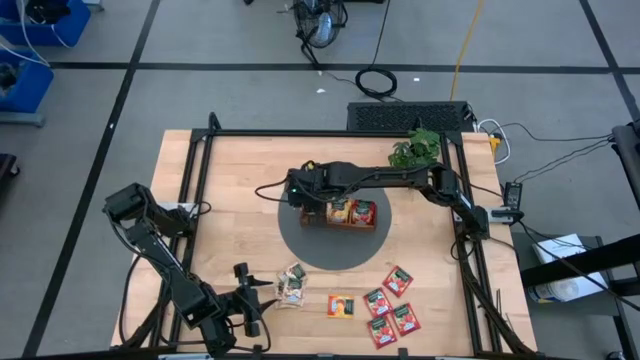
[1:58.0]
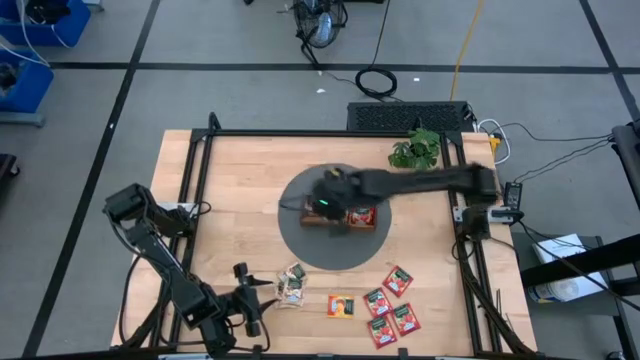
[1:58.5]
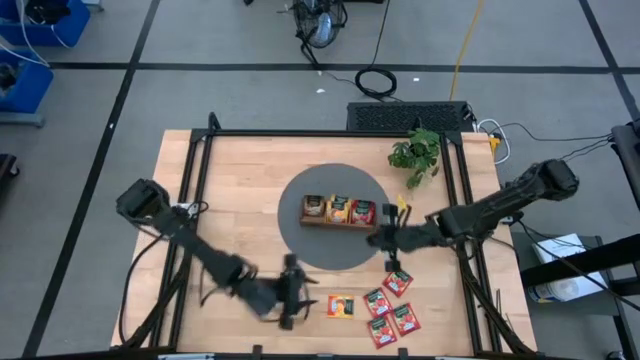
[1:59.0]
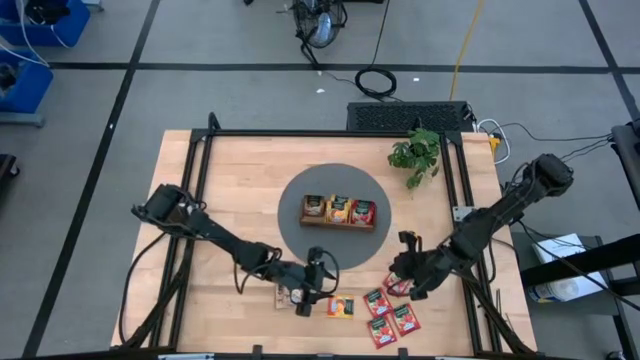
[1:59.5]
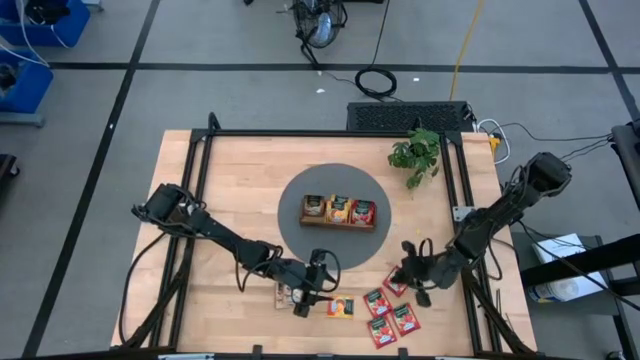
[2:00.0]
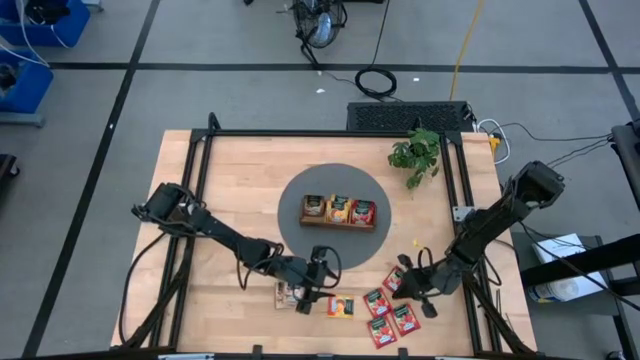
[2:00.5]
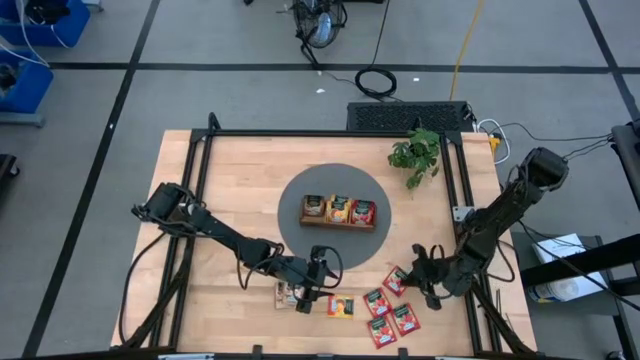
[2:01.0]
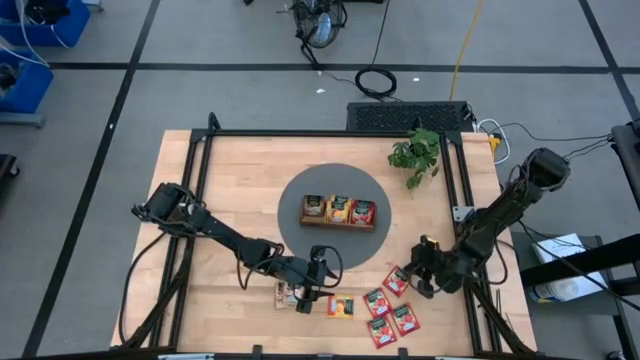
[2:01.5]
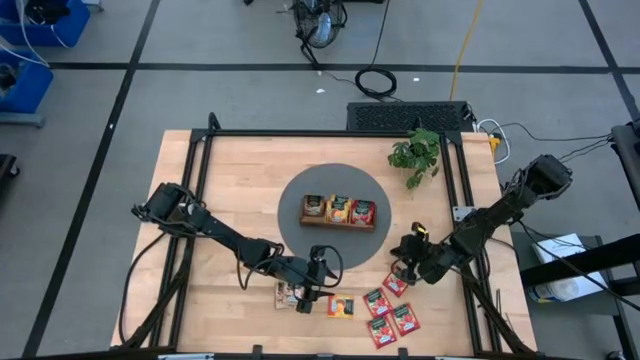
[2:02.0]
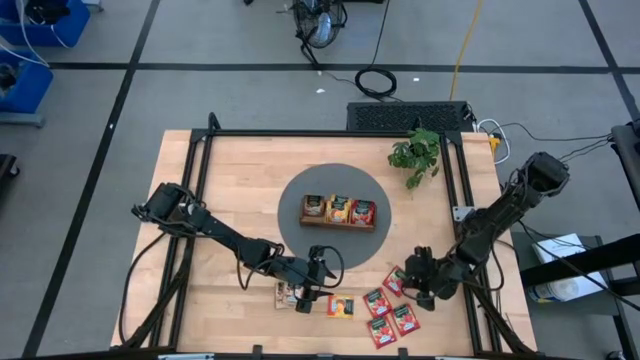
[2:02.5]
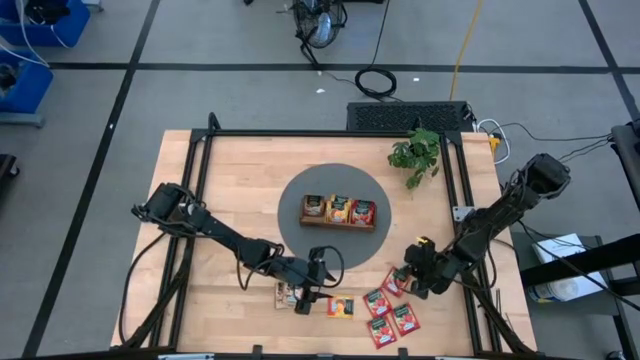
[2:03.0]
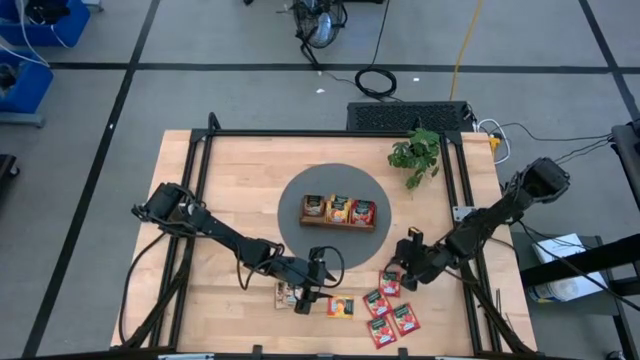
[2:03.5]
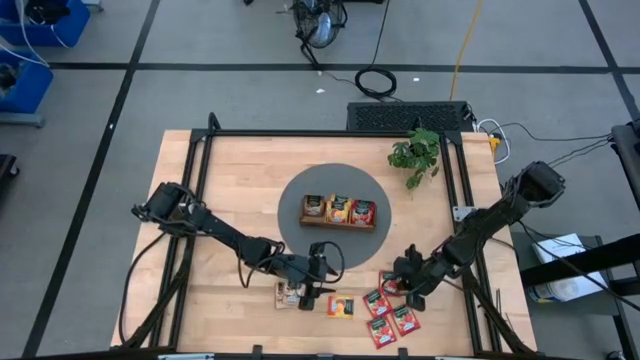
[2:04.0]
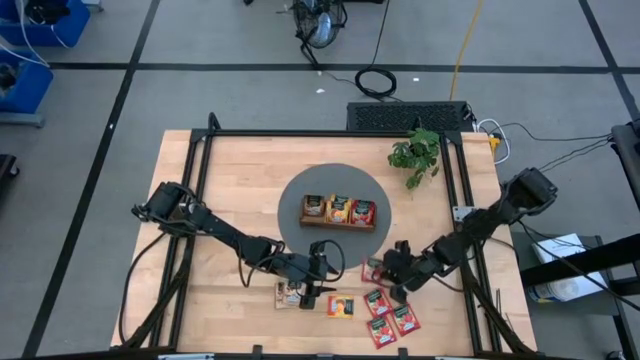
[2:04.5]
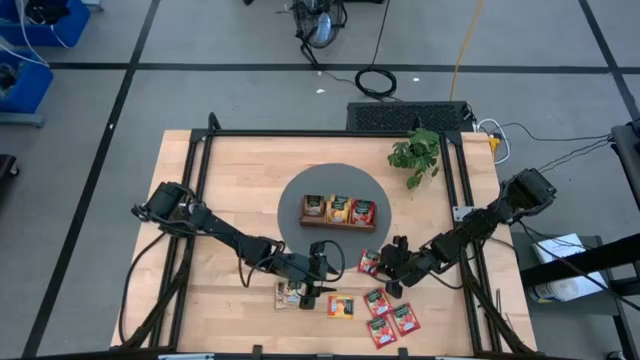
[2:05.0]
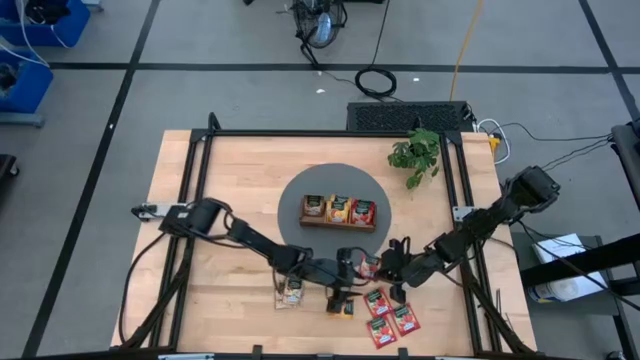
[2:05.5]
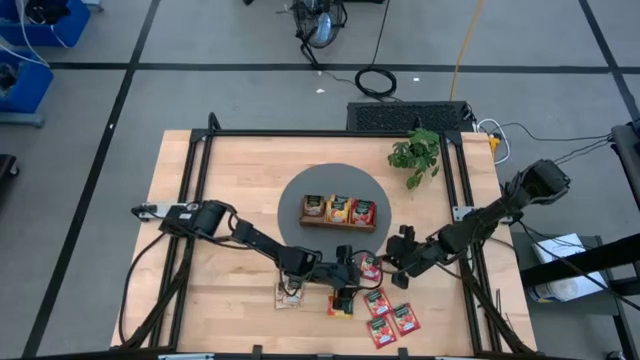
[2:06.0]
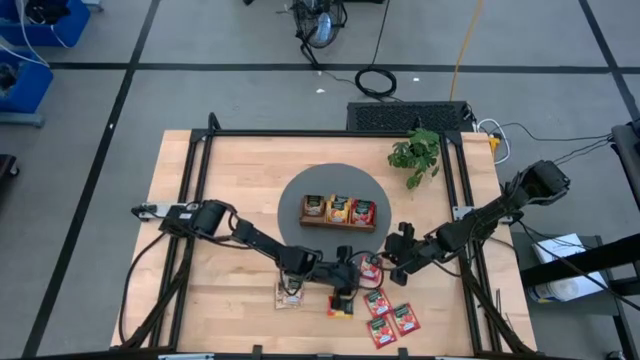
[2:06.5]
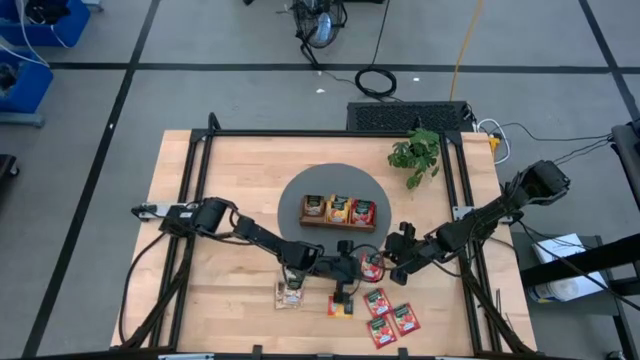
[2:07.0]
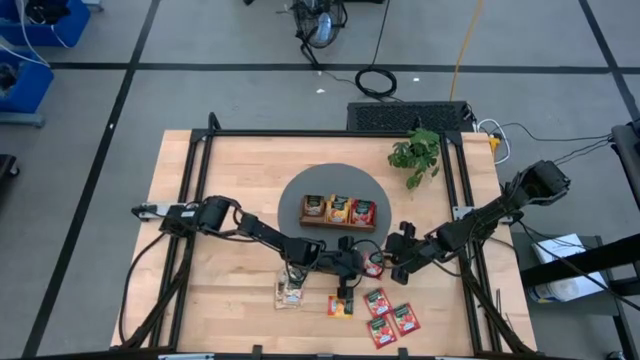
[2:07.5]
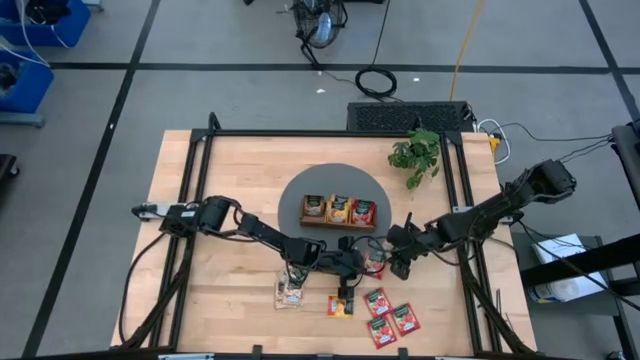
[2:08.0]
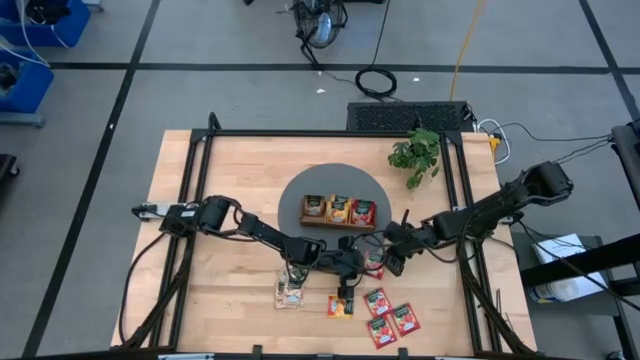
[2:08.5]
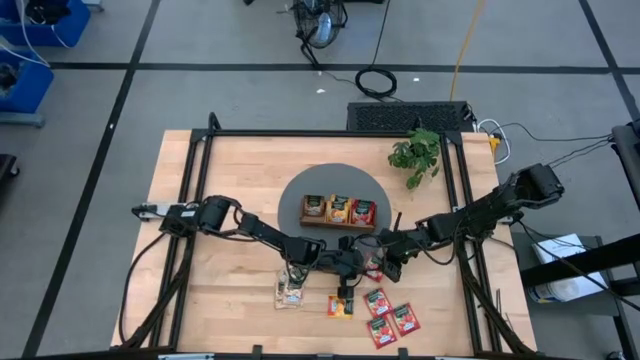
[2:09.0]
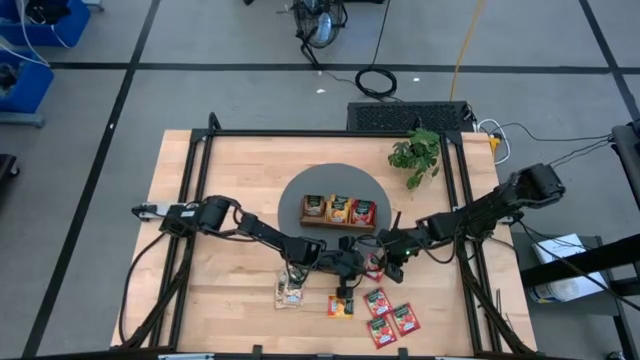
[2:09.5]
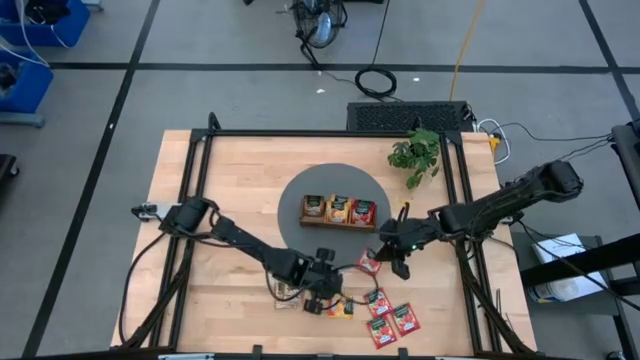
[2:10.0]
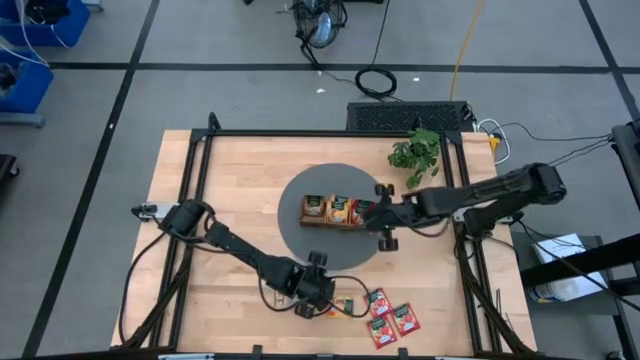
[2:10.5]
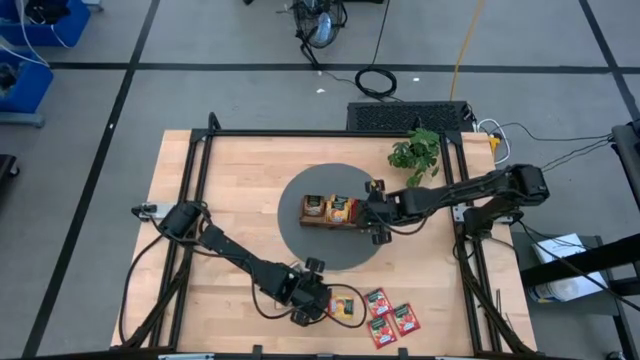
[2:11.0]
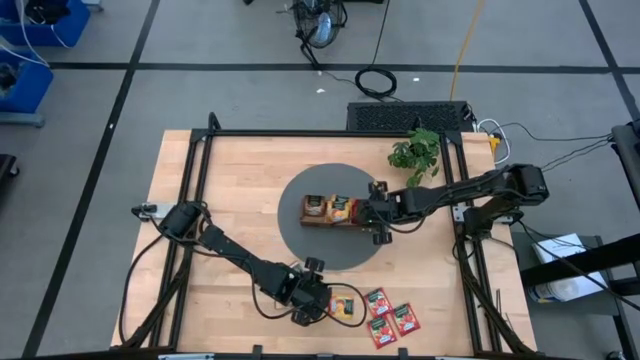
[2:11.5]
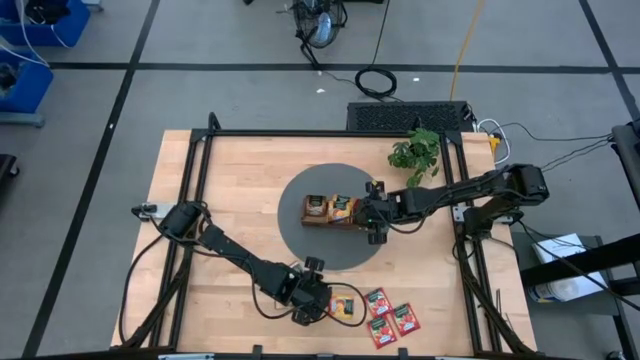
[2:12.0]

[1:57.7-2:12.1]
Task: Pick & Place Tea
Put the red tea bag into the right compartment of the wooden organizer

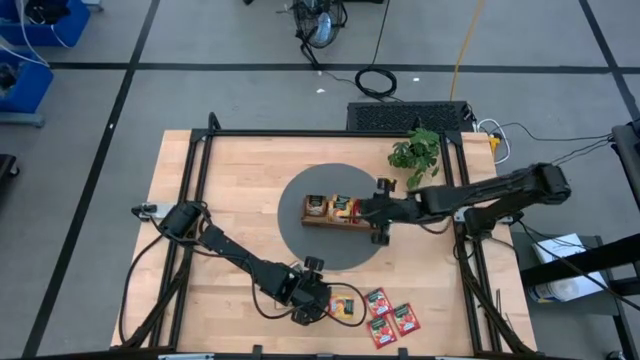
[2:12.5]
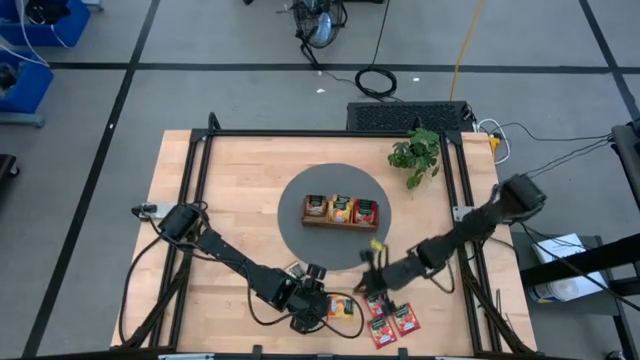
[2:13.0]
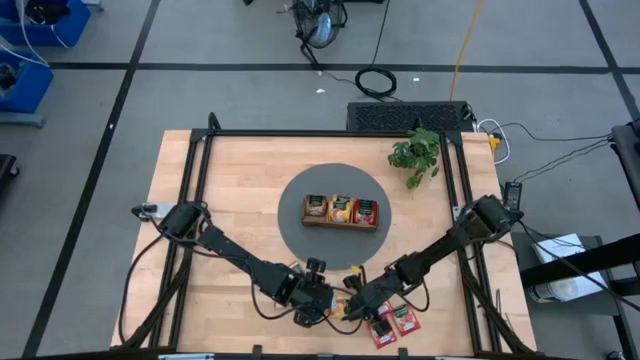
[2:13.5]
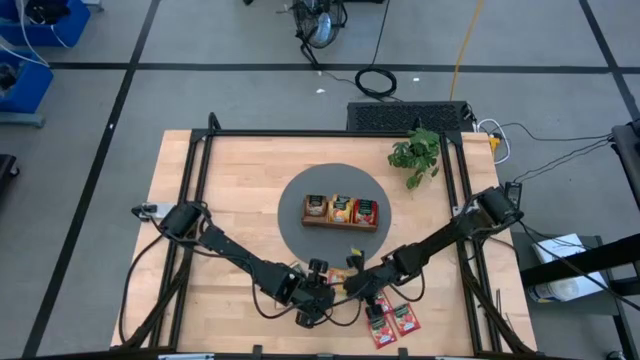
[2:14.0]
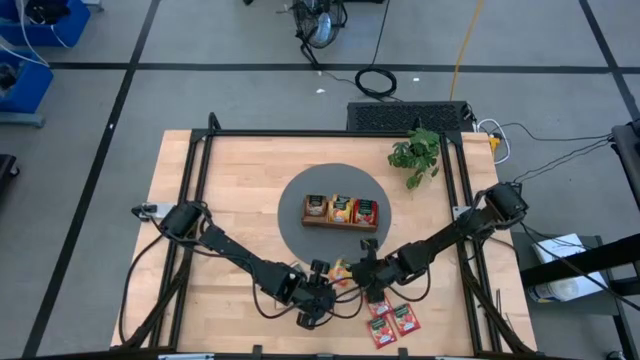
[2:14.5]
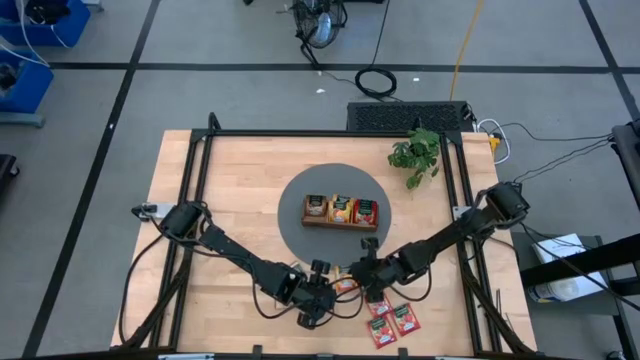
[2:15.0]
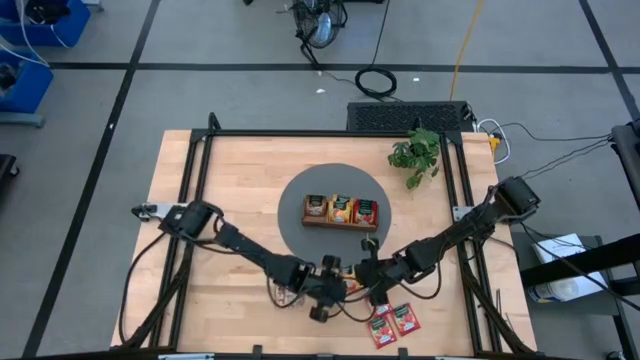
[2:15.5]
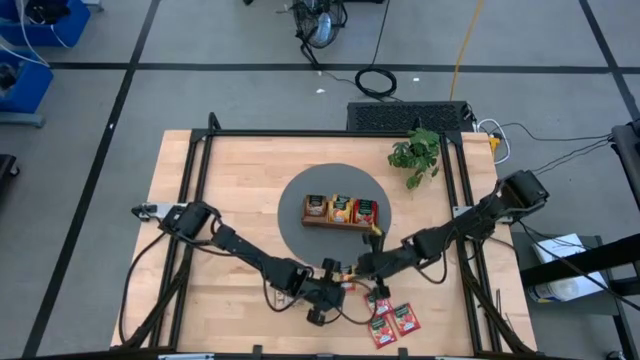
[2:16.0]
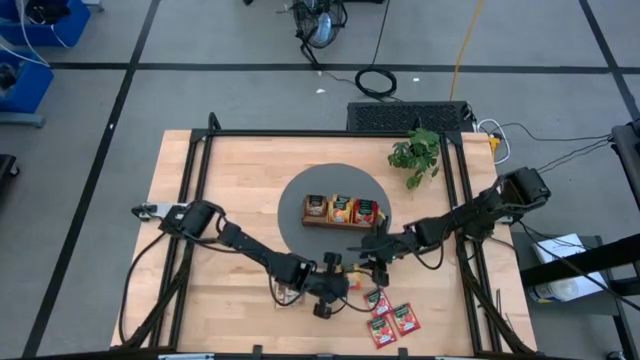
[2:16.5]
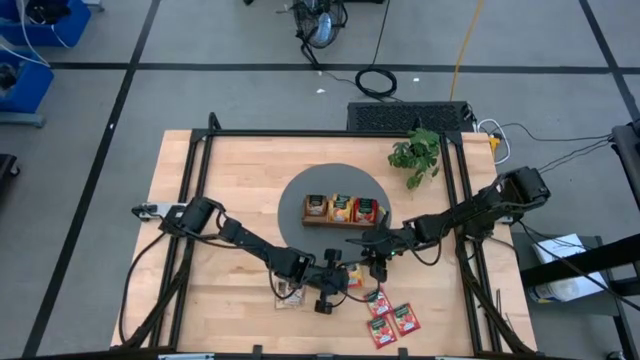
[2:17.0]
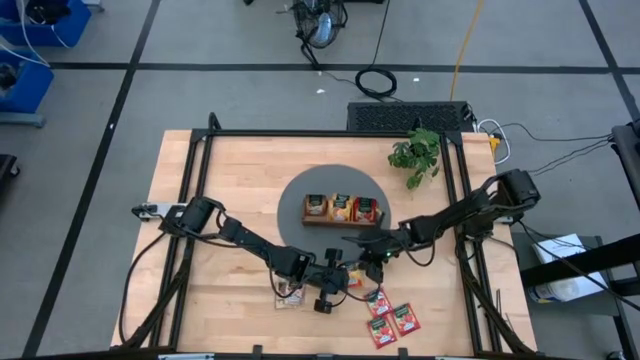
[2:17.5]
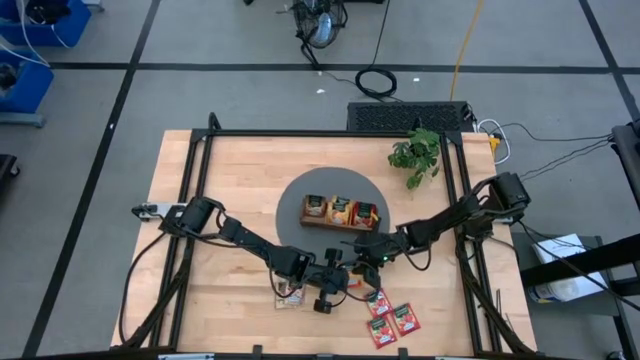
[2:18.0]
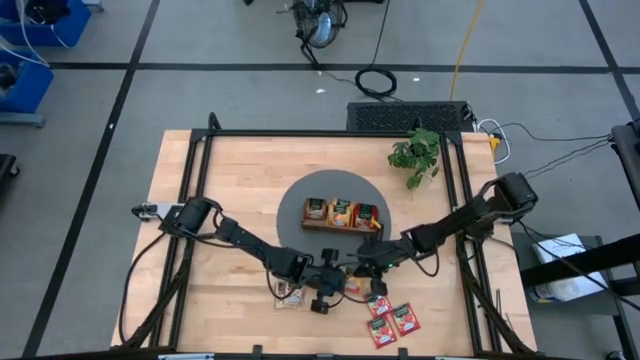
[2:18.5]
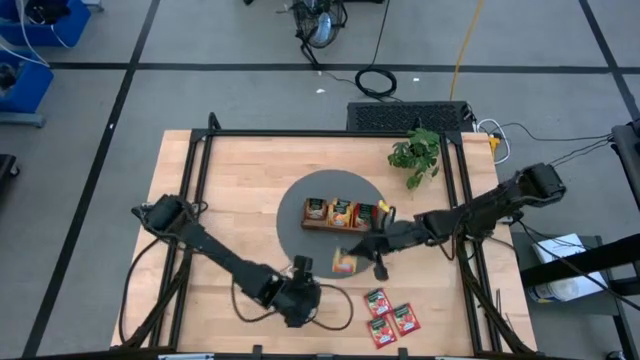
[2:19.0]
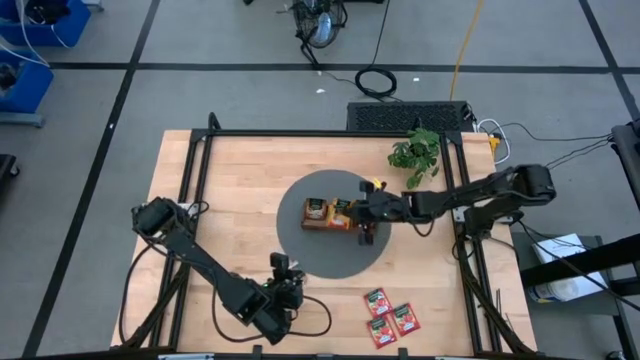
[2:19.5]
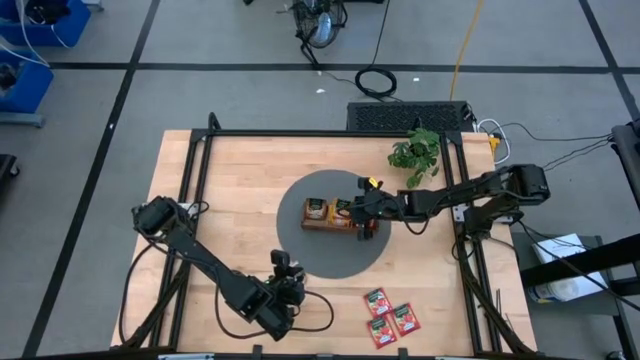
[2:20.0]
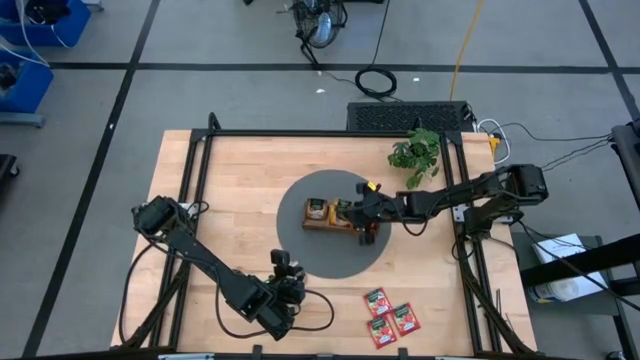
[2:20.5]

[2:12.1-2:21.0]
Put the yellow tea bag into the middle compartment of the wooden organizer
